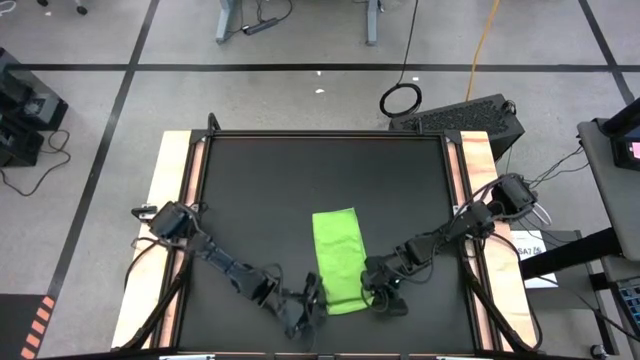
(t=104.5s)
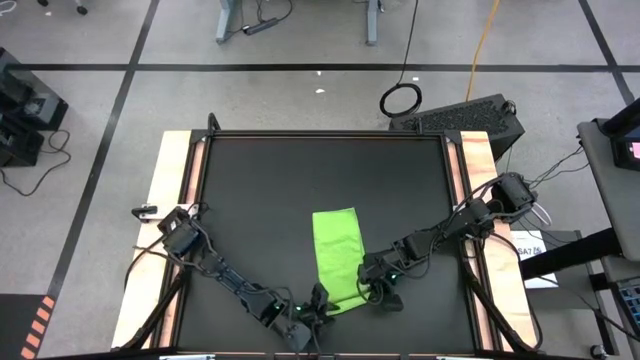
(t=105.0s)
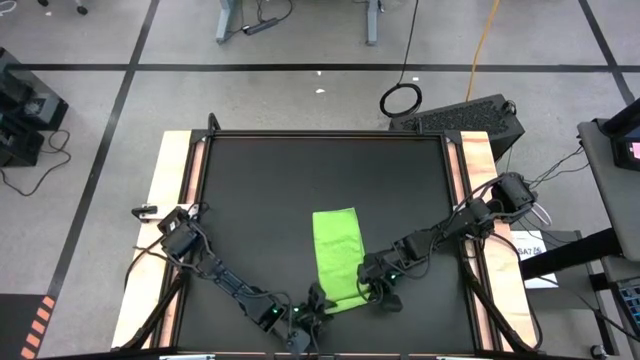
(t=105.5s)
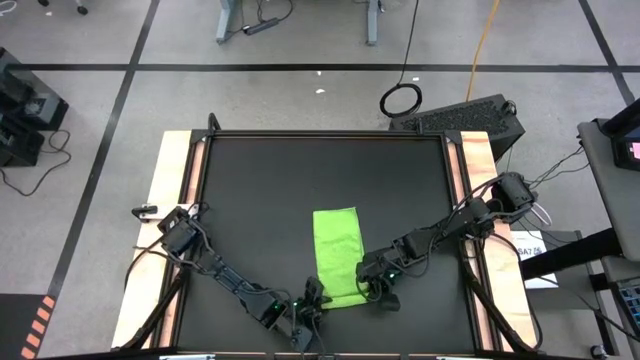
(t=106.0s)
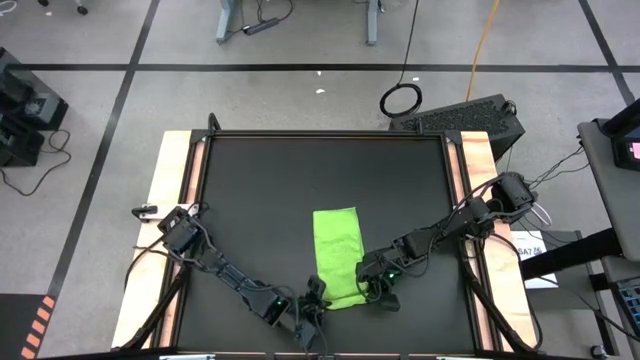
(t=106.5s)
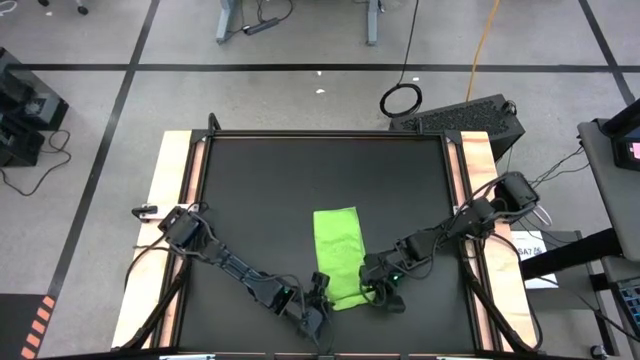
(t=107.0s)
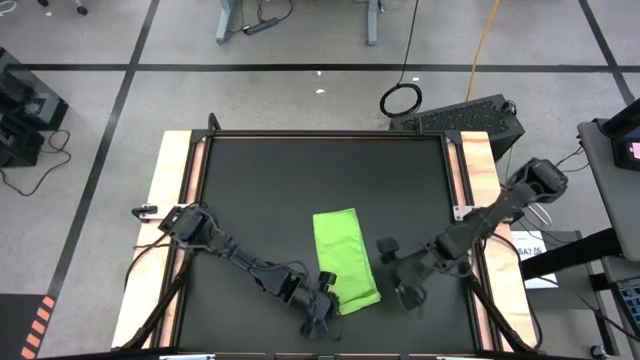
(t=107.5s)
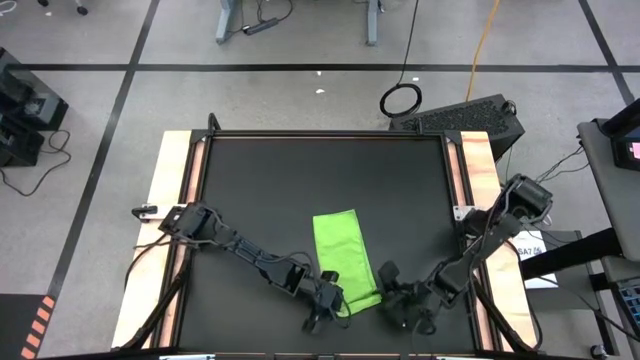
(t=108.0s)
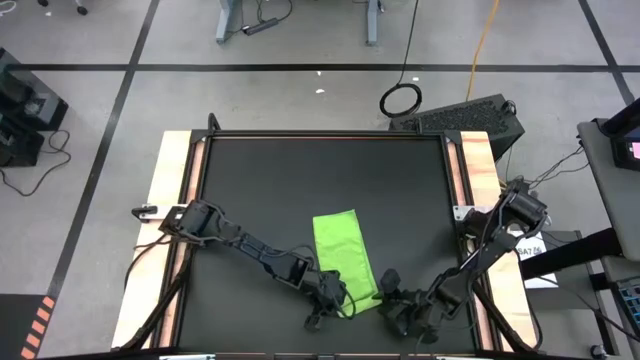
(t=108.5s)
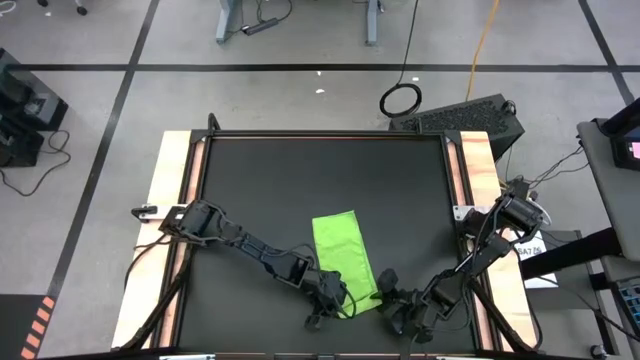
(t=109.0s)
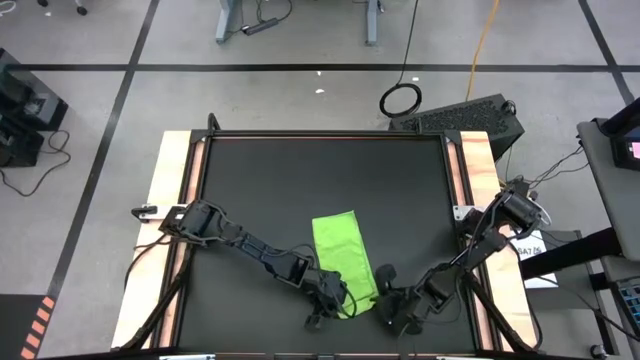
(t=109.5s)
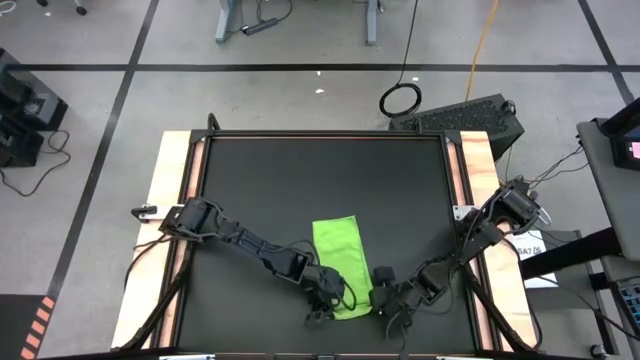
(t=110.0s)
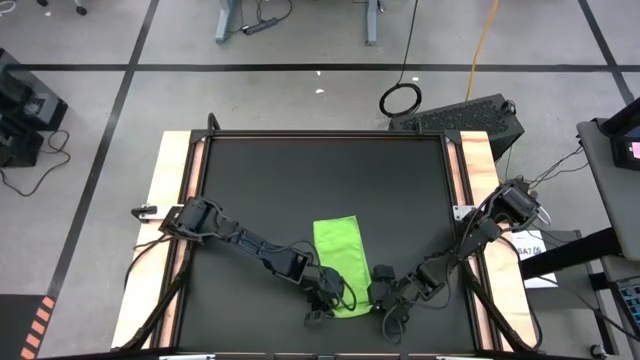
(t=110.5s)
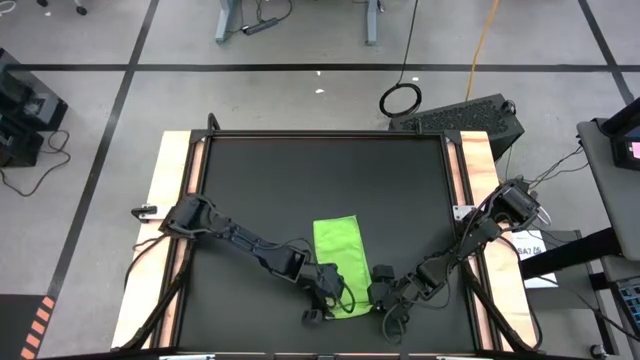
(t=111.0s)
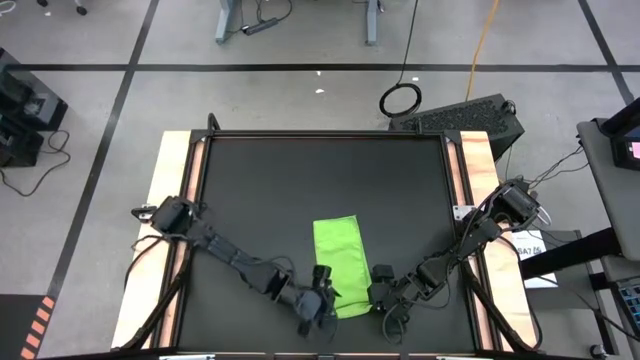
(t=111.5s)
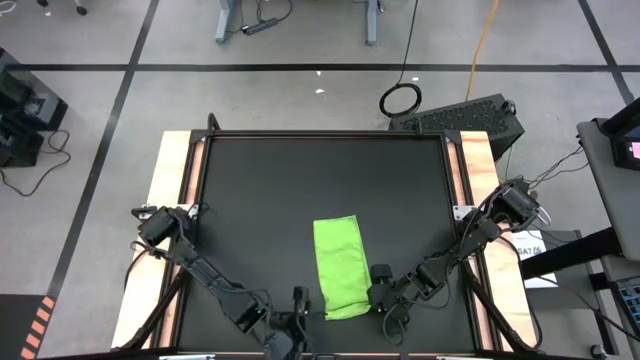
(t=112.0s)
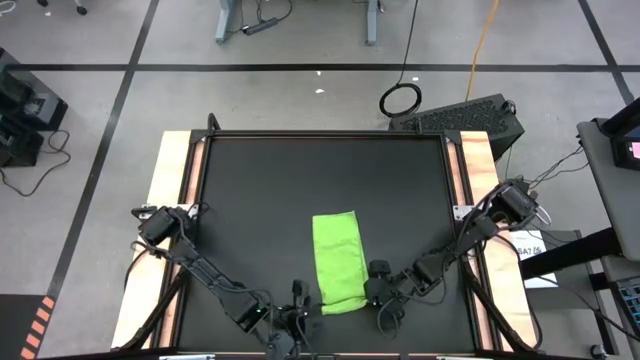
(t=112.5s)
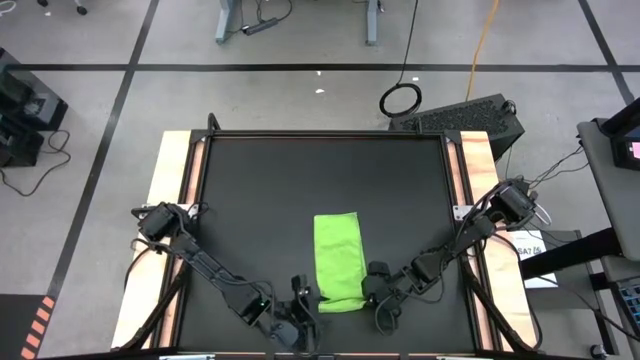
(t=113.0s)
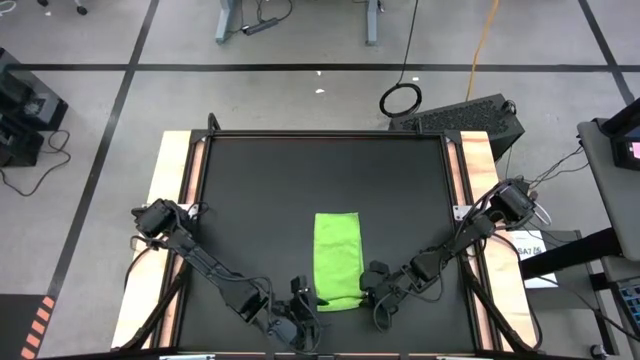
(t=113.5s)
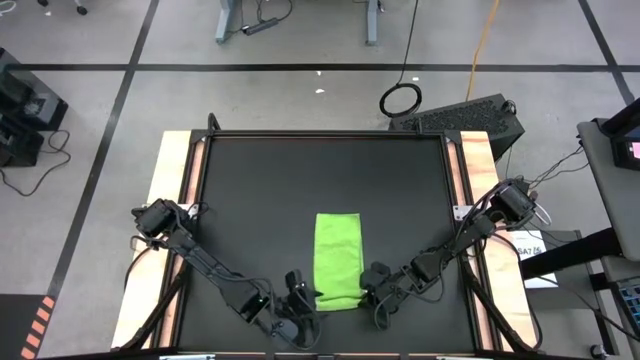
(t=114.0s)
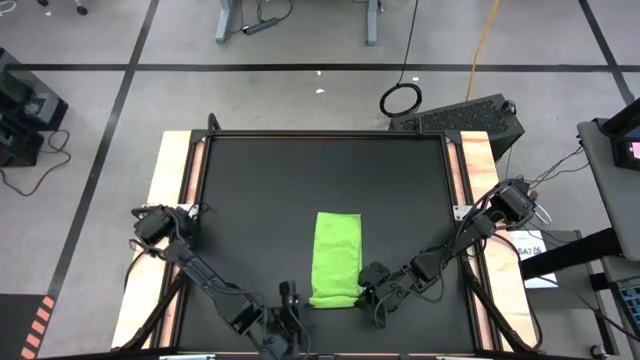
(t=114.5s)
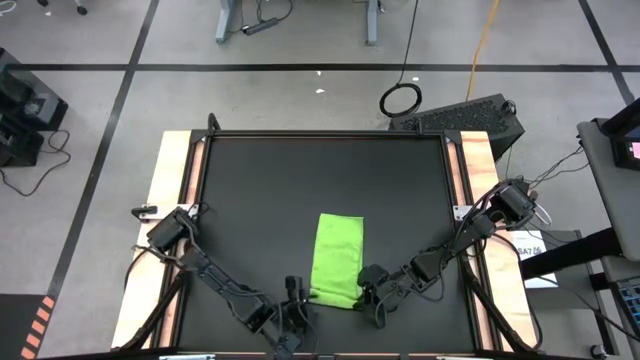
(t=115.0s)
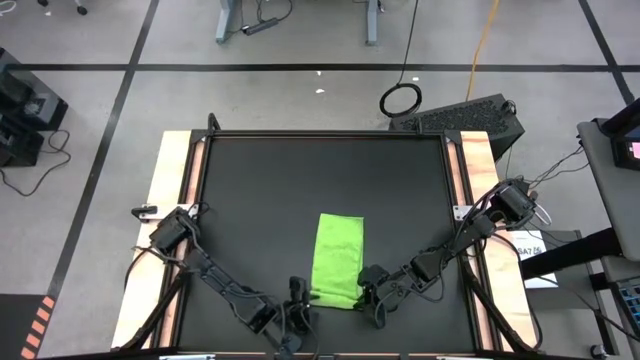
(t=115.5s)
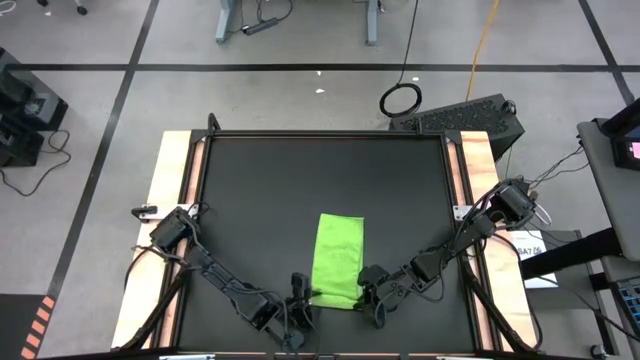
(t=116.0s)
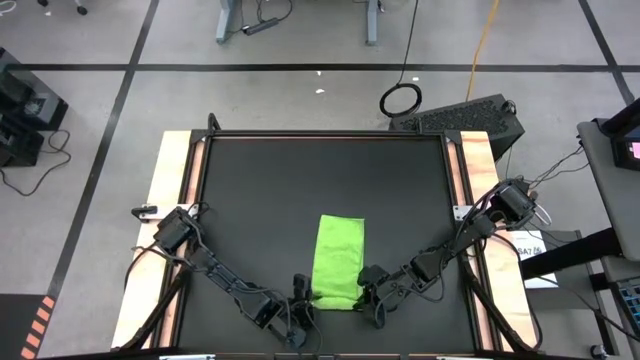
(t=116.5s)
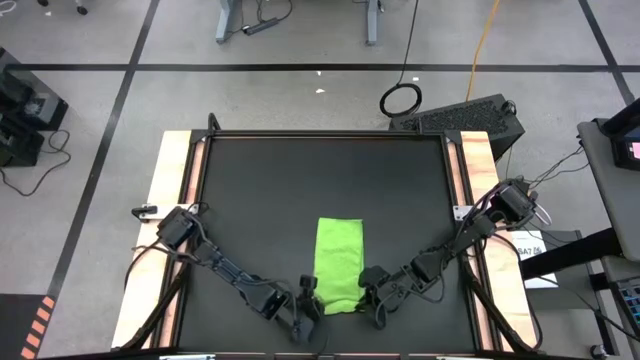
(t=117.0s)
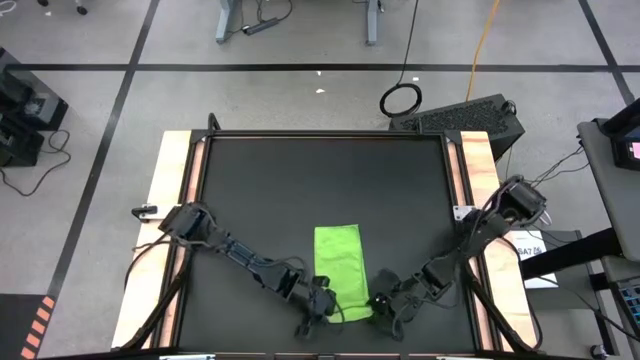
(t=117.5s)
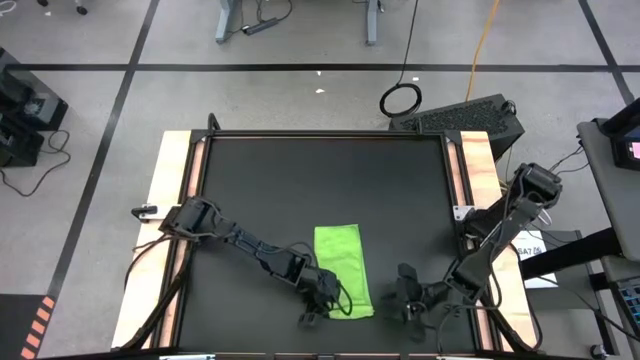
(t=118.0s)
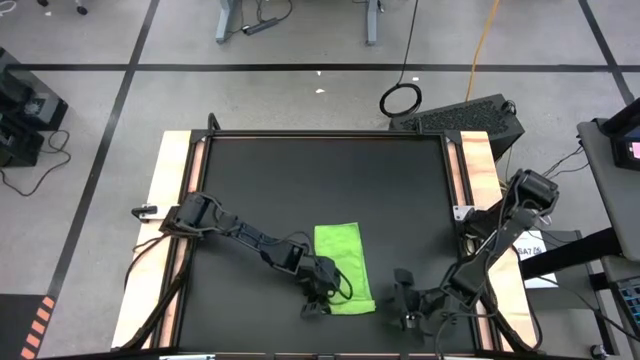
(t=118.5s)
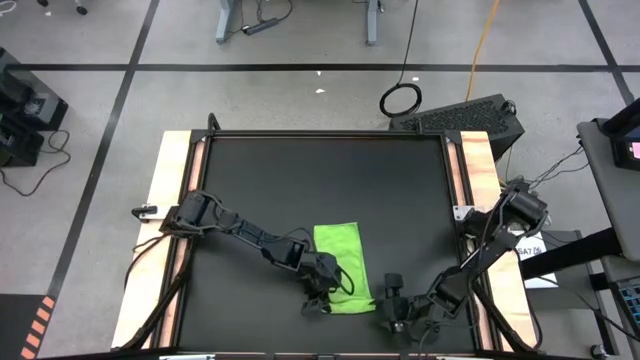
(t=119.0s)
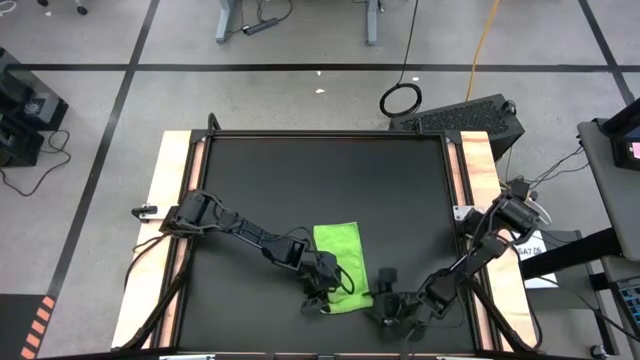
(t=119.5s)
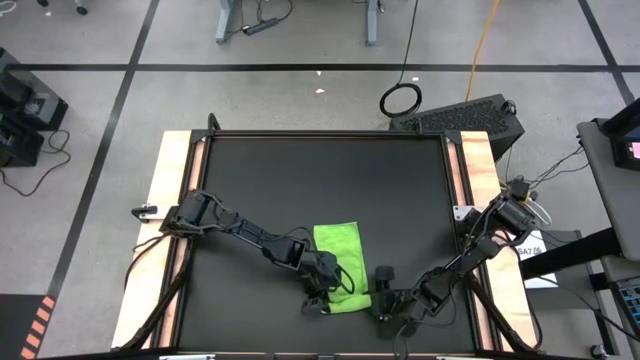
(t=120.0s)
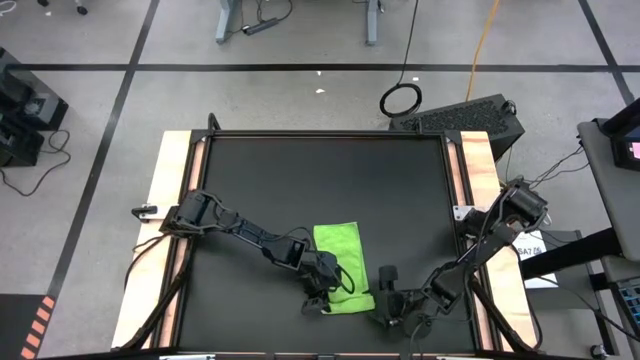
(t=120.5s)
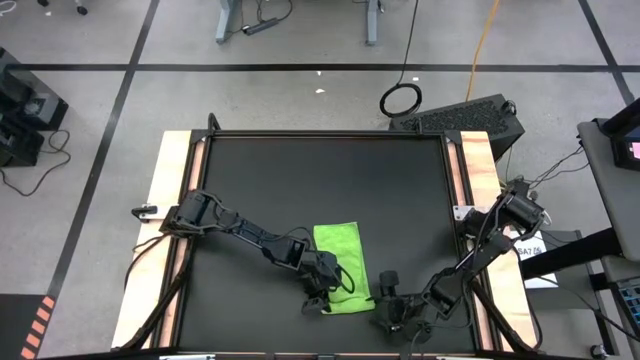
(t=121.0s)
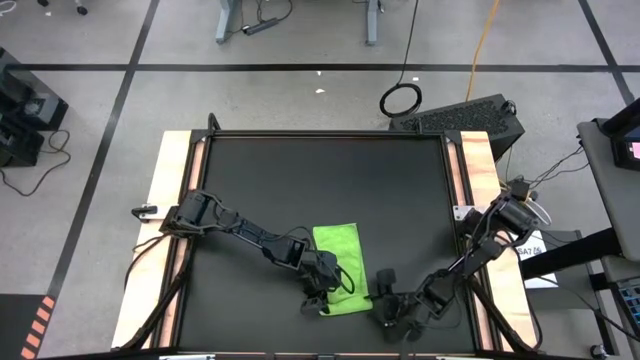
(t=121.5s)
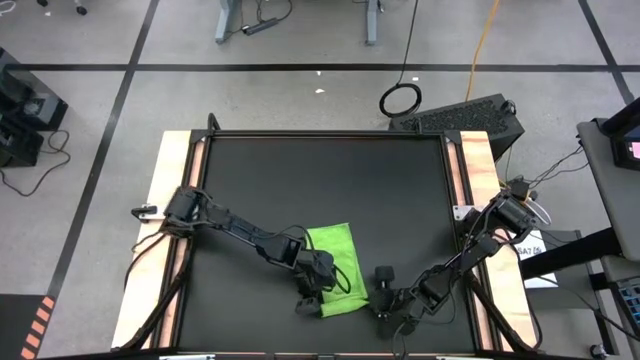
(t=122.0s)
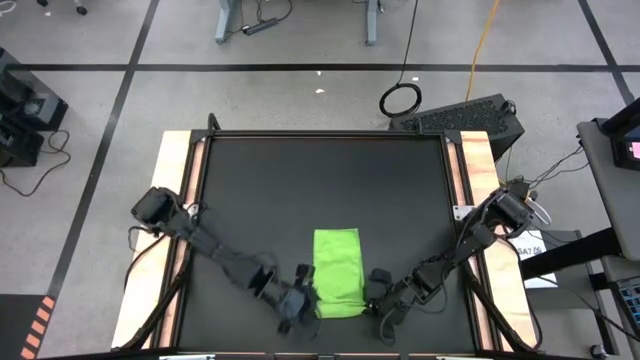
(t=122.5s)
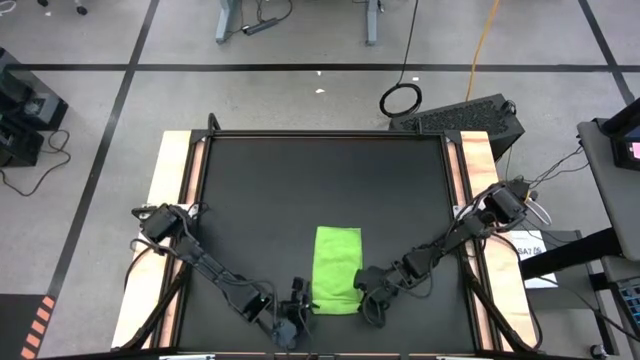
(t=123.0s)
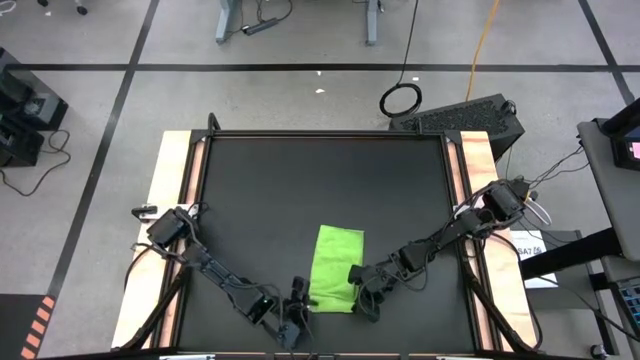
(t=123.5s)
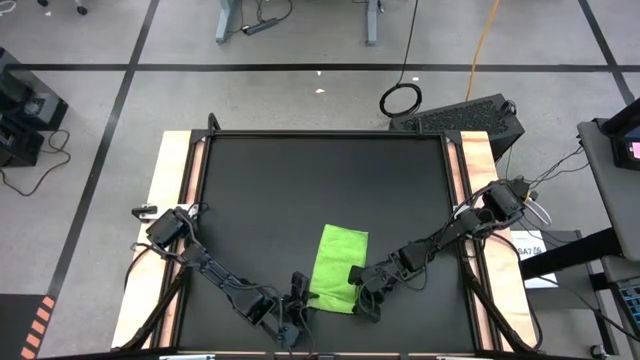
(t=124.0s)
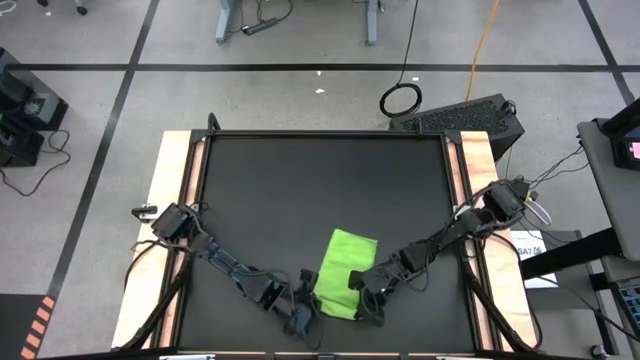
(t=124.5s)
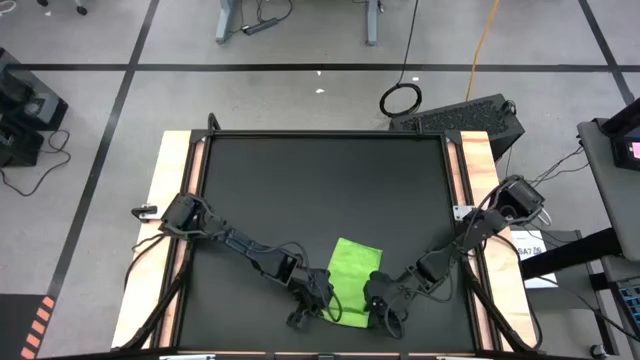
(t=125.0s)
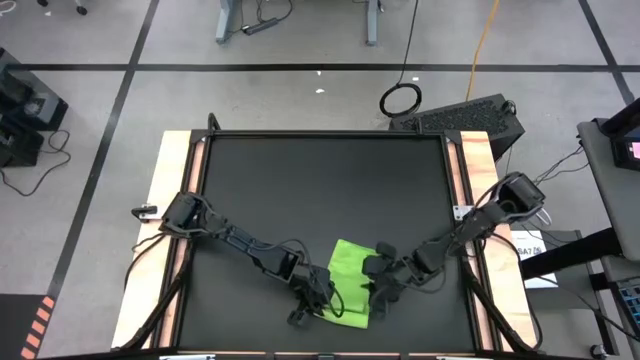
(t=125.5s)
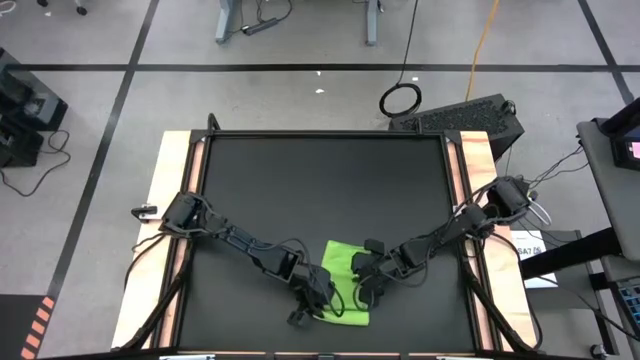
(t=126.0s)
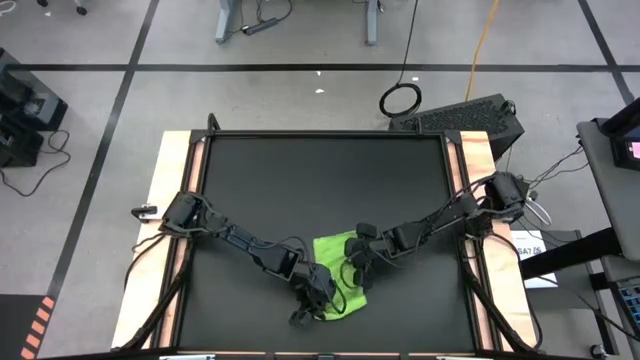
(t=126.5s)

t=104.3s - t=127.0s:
Task: Roll towel
Roll the green microfiber towel
